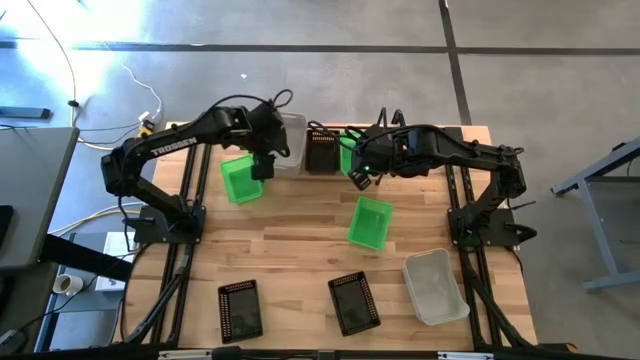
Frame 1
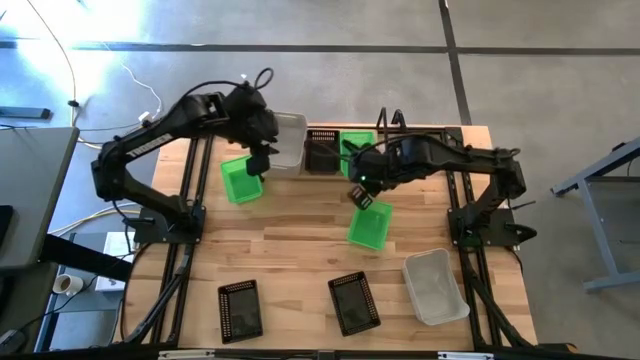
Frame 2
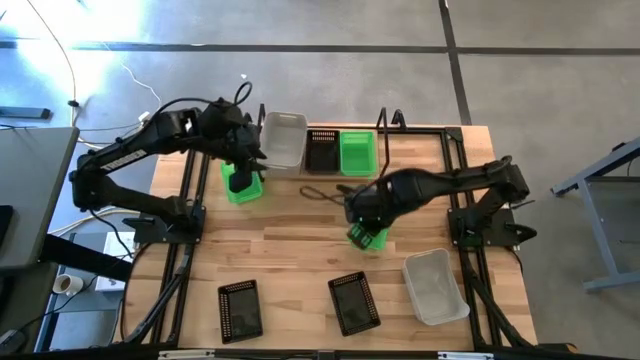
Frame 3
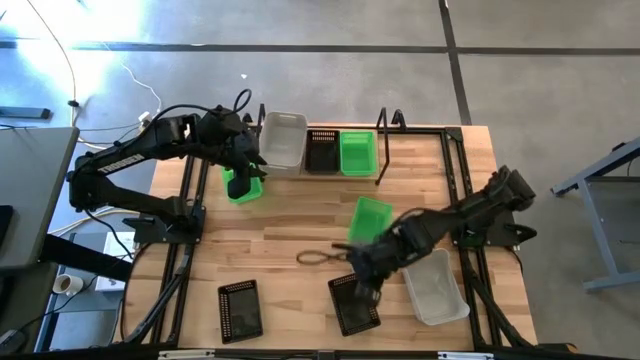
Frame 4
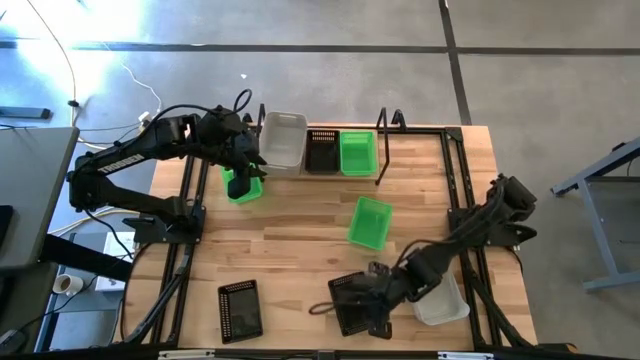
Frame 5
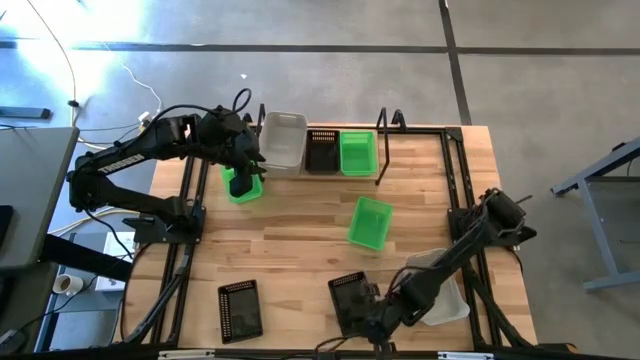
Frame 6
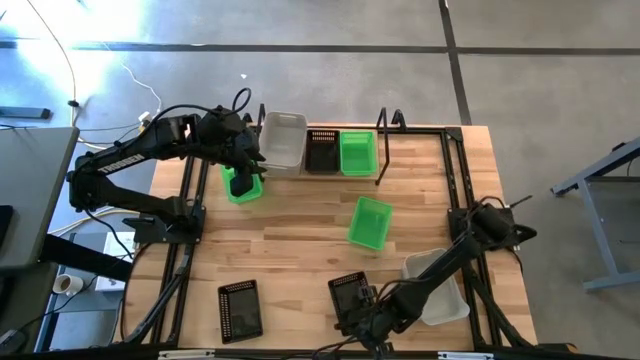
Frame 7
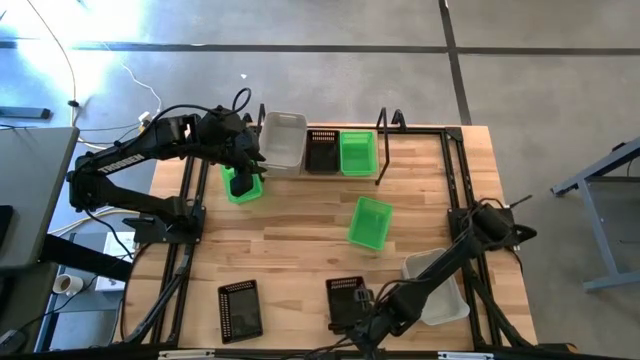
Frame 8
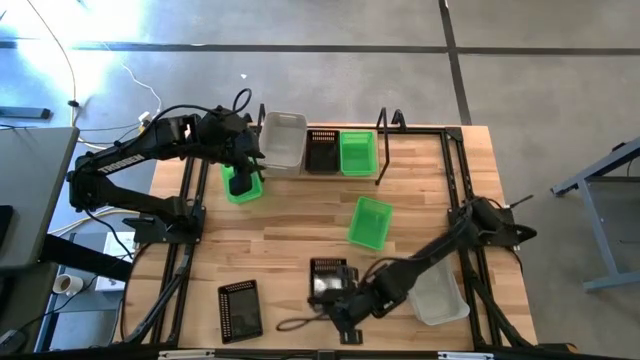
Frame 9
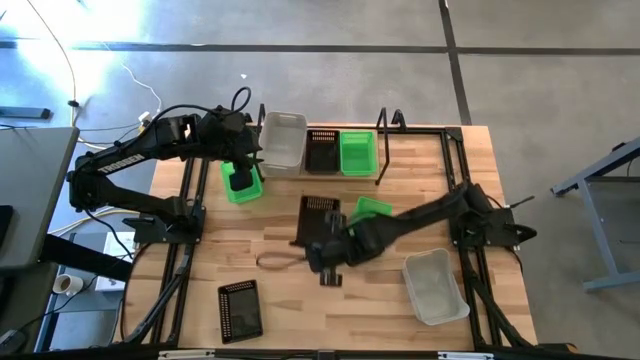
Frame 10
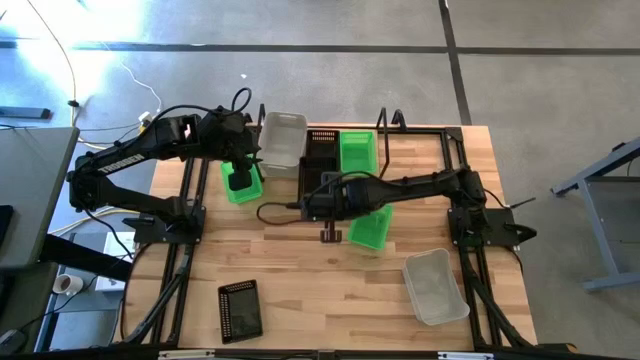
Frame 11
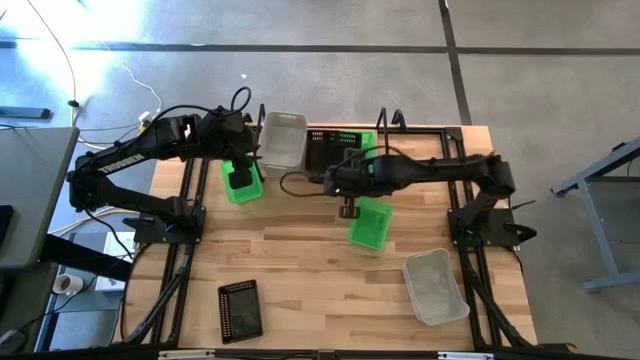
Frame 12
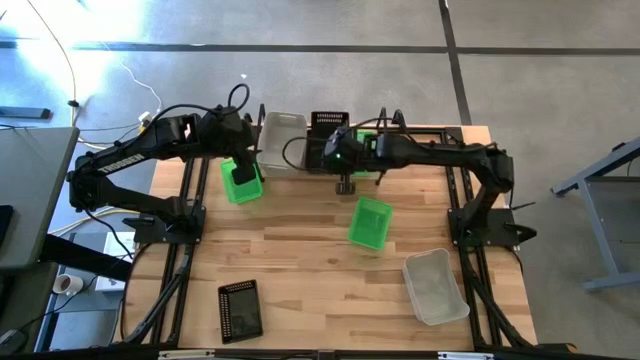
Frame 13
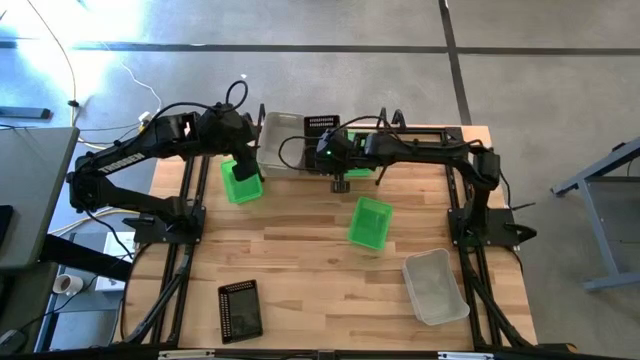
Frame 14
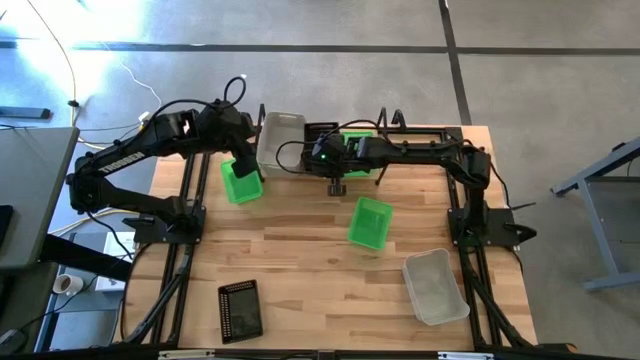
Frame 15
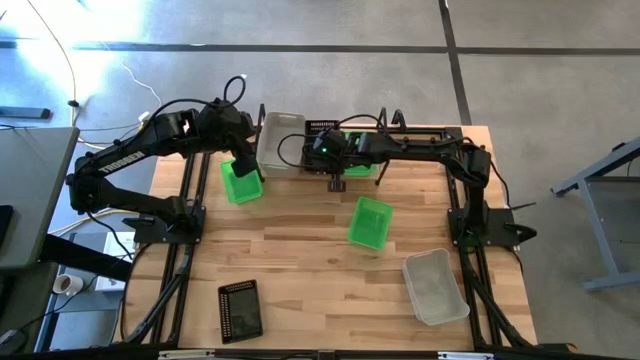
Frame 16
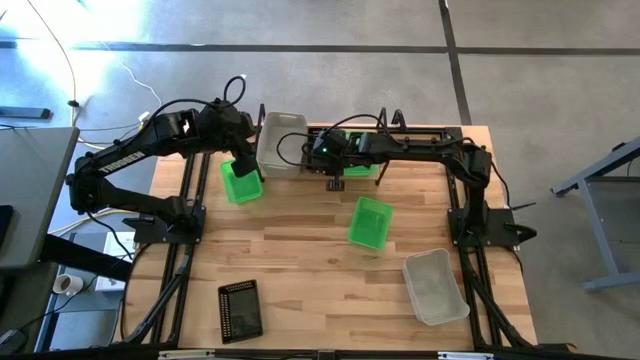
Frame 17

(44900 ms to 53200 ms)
Task: Stack baskets on shelf by color
Stack the right black bin on the black bin on the shelf

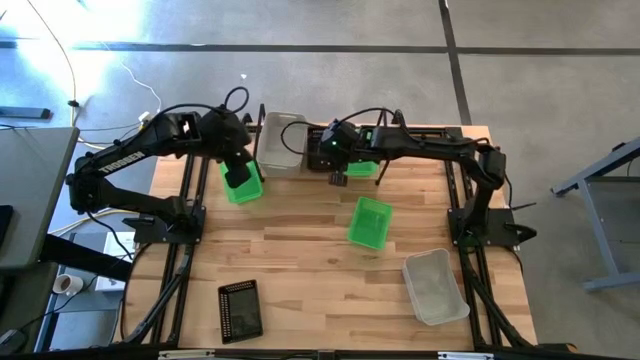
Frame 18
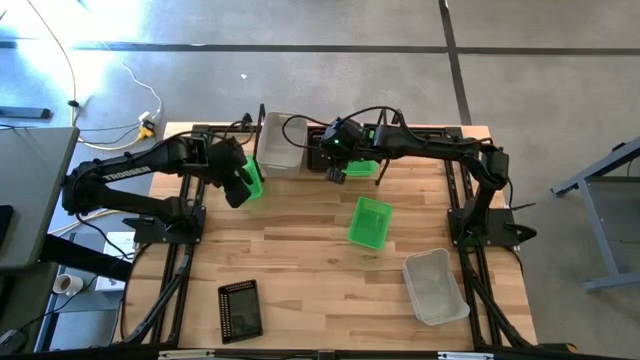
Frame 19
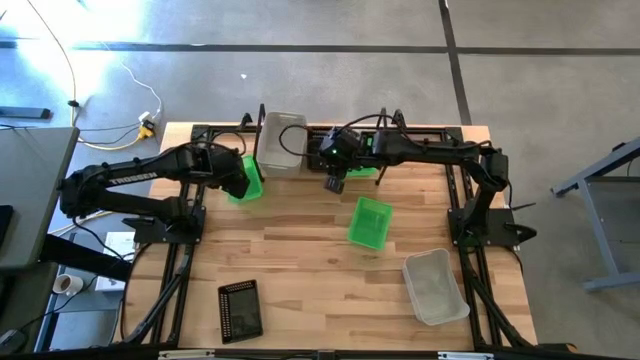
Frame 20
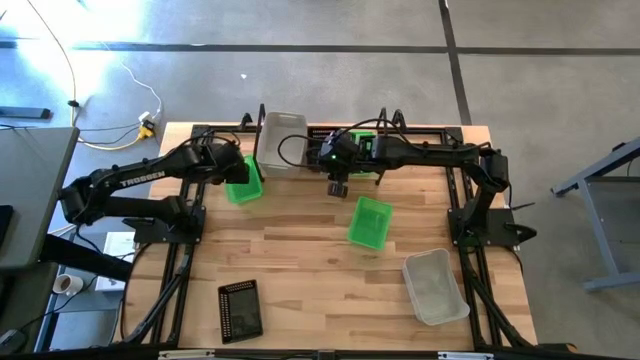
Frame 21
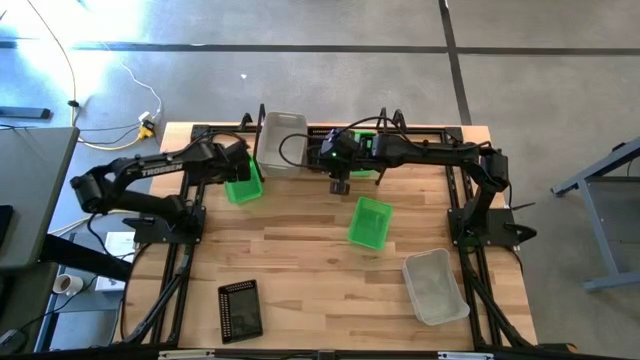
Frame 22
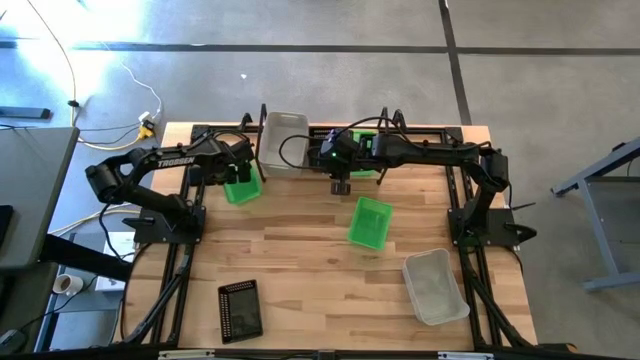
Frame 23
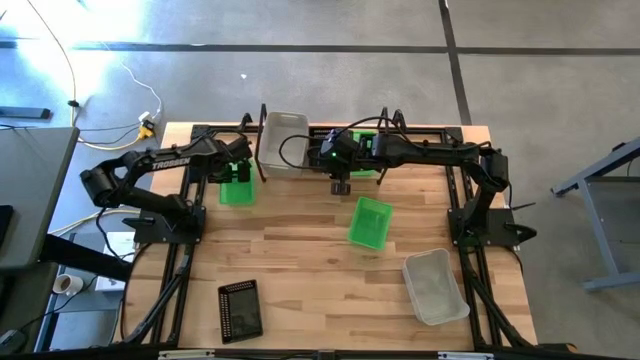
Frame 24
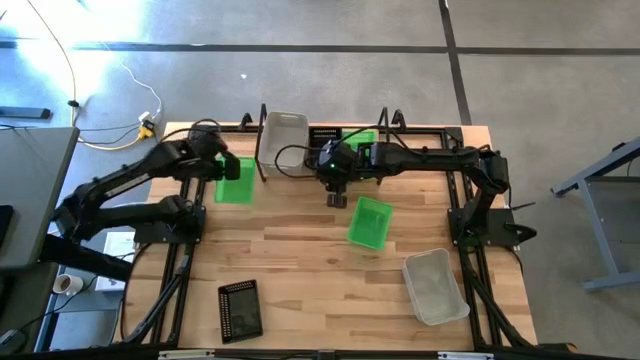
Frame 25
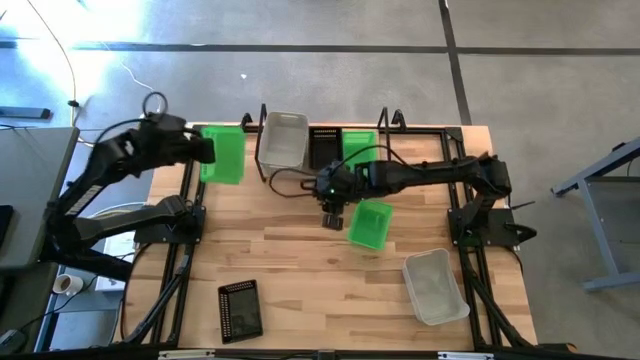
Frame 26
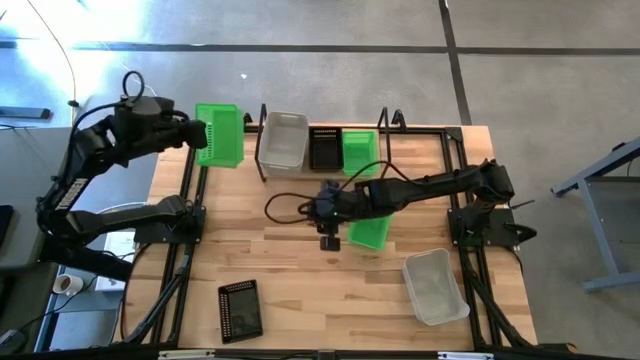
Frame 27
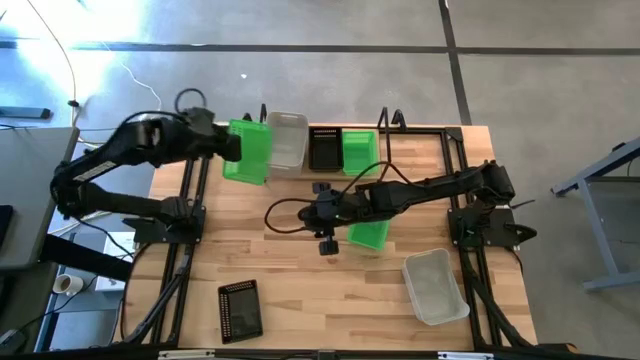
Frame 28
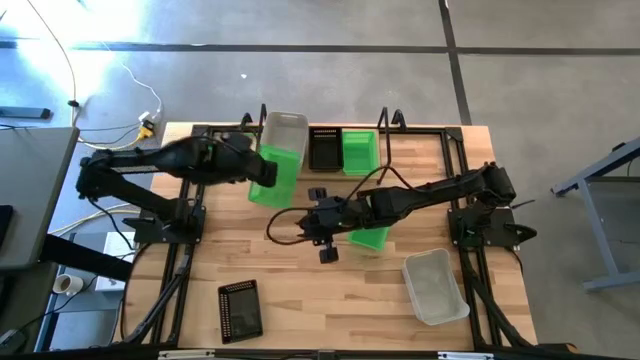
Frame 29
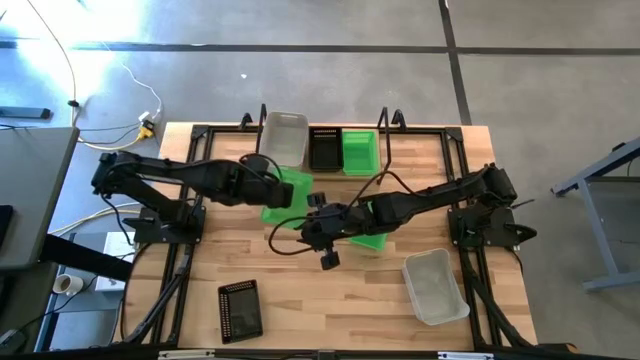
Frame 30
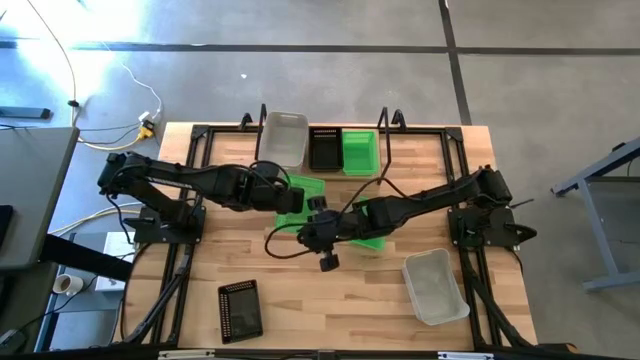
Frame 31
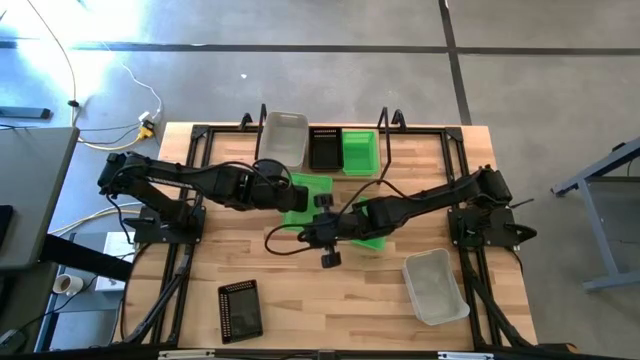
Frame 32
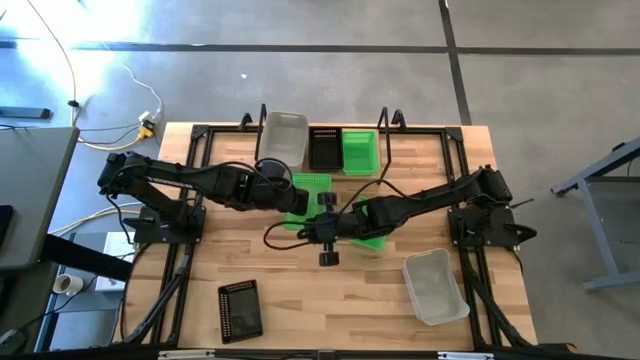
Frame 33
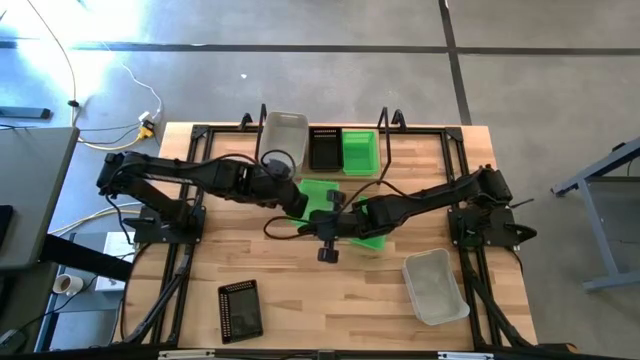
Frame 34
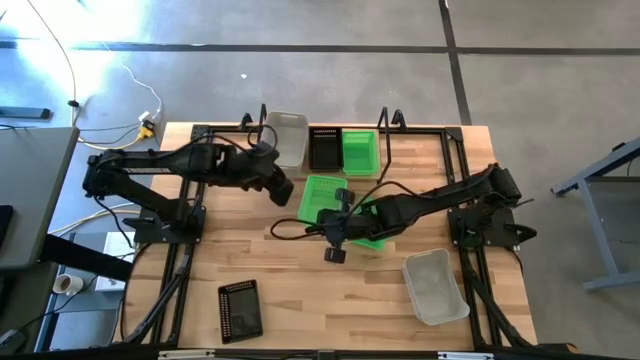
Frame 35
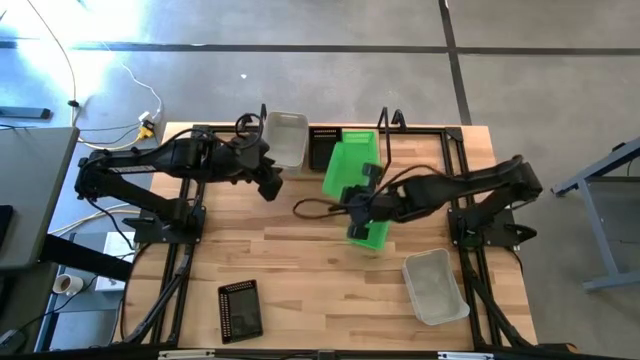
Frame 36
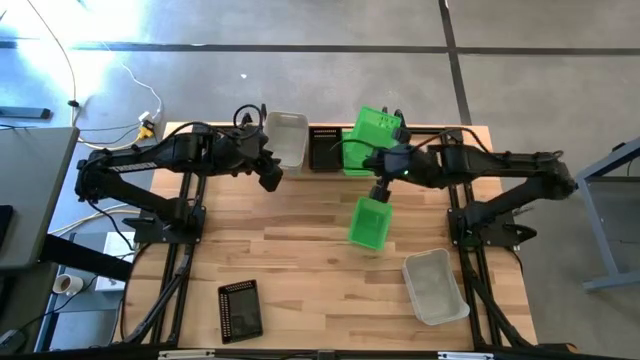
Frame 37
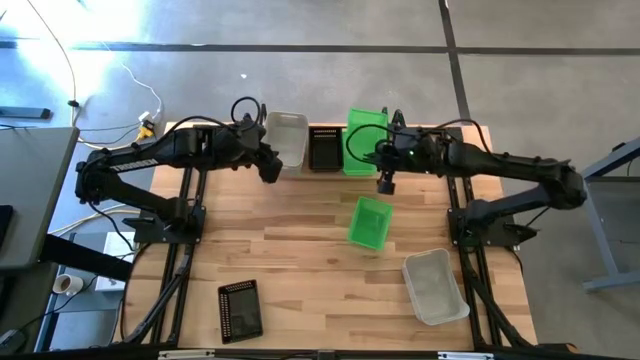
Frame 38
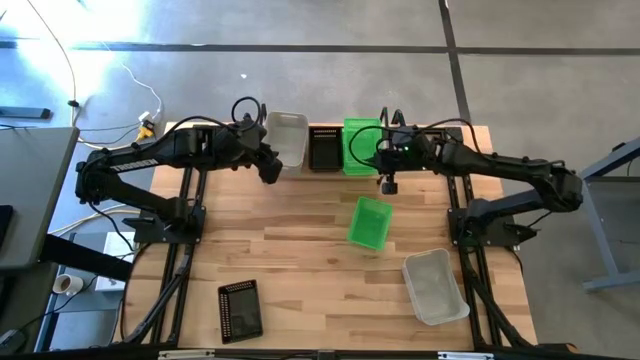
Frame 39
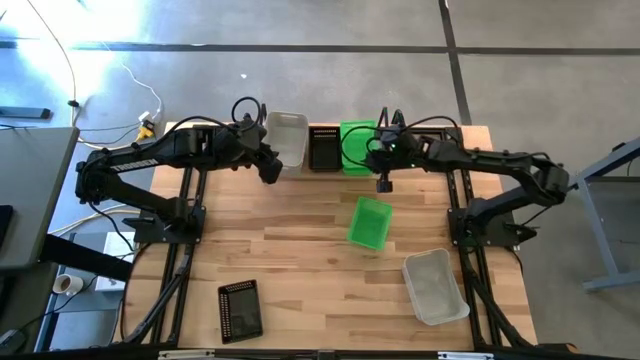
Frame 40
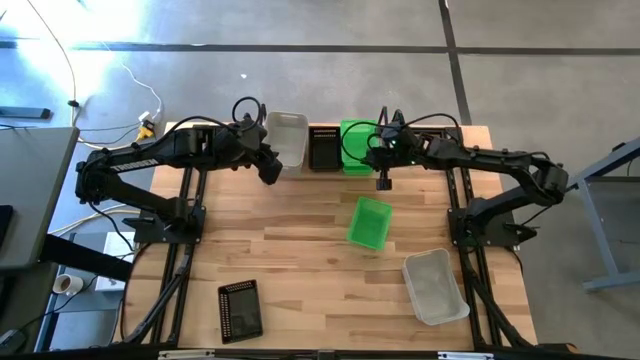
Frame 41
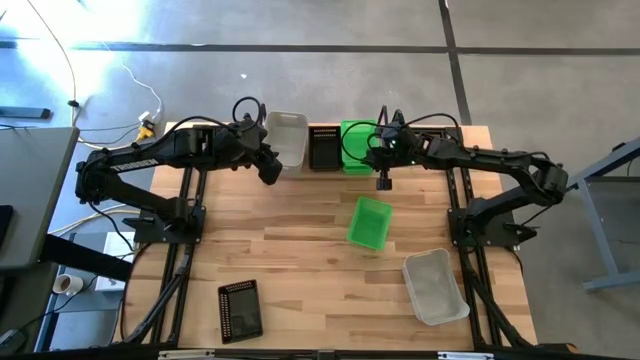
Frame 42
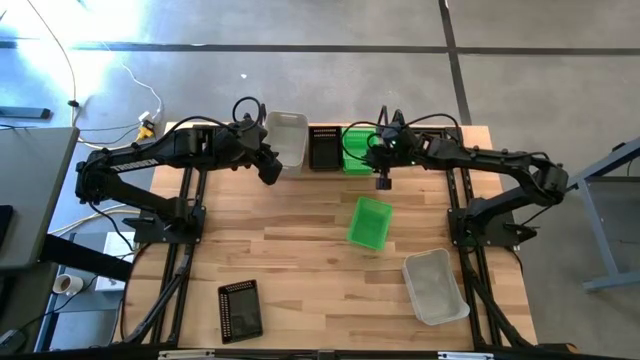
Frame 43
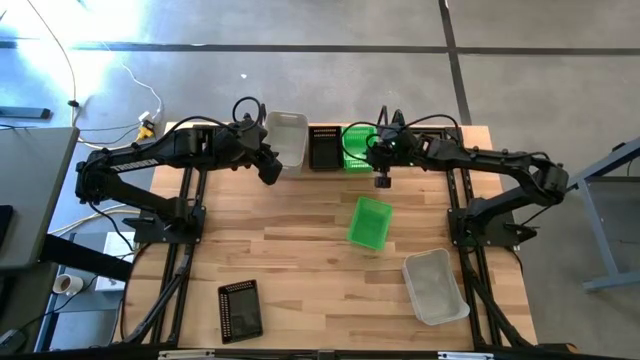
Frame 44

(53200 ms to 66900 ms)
Stack the top green bin on the green bin on the shelf
